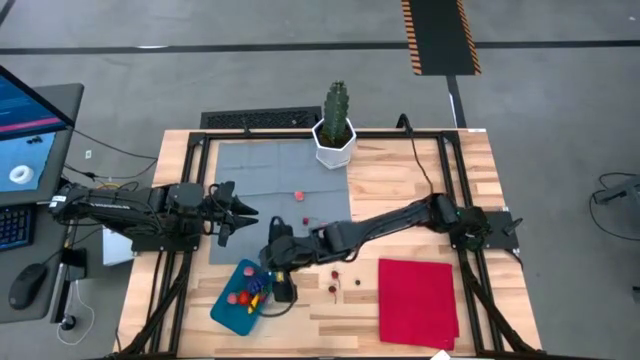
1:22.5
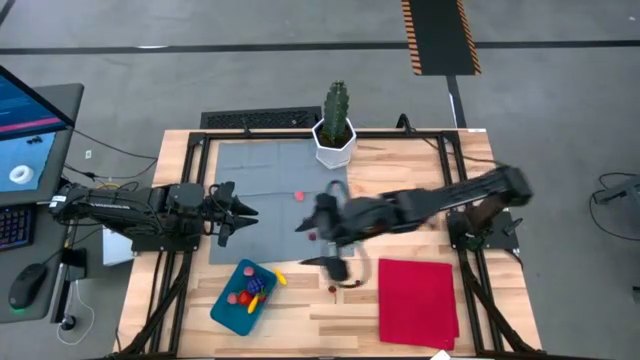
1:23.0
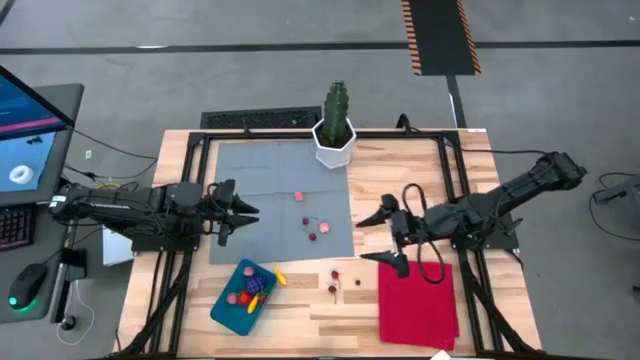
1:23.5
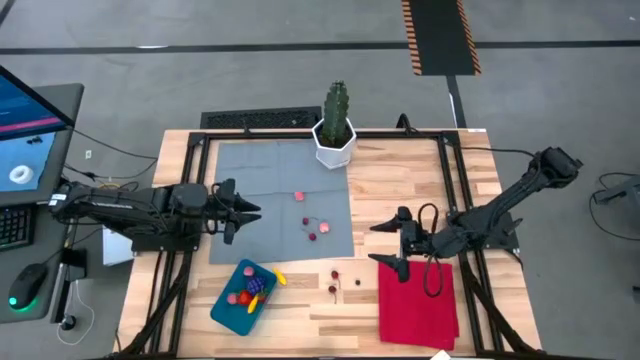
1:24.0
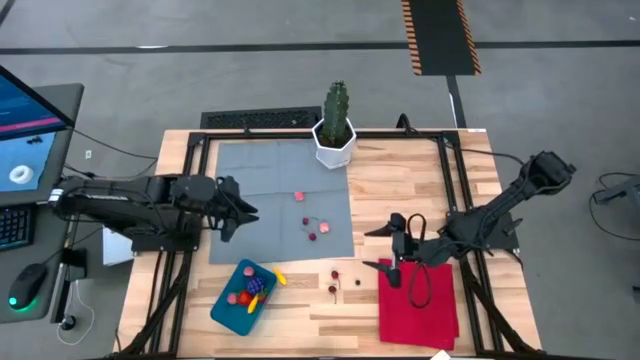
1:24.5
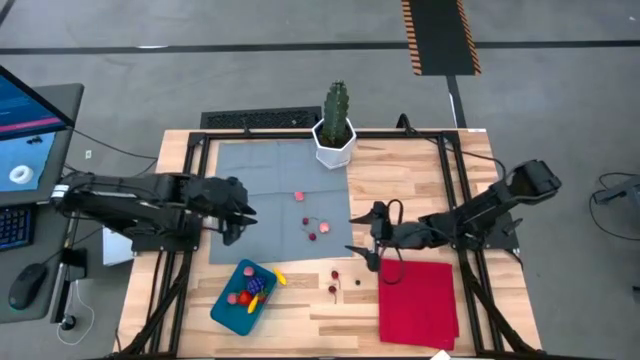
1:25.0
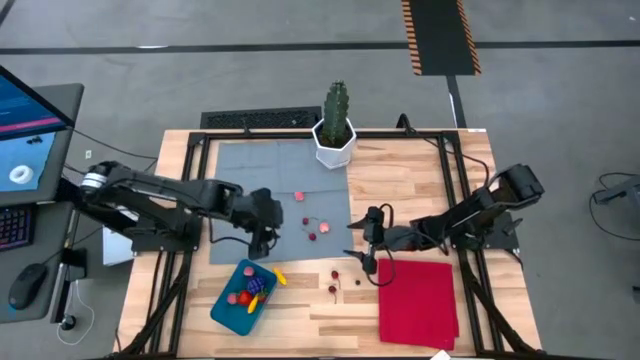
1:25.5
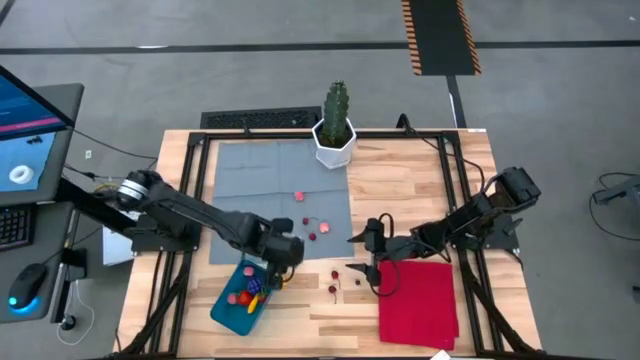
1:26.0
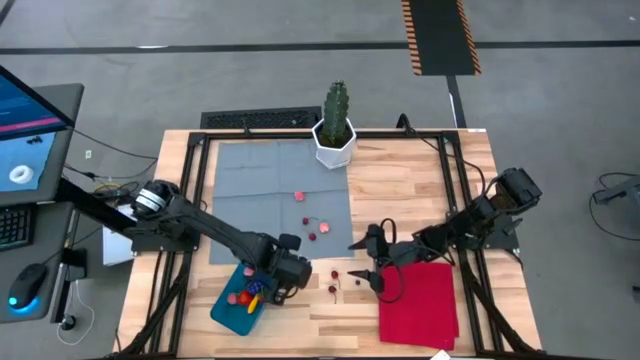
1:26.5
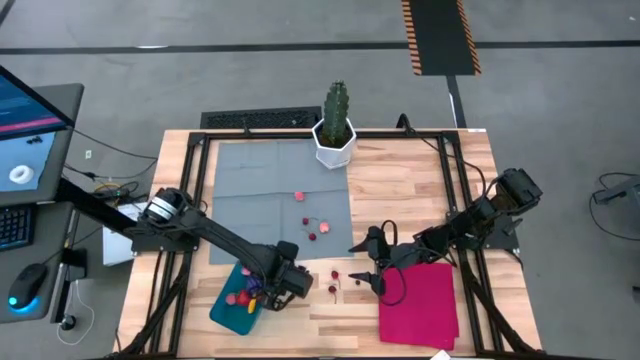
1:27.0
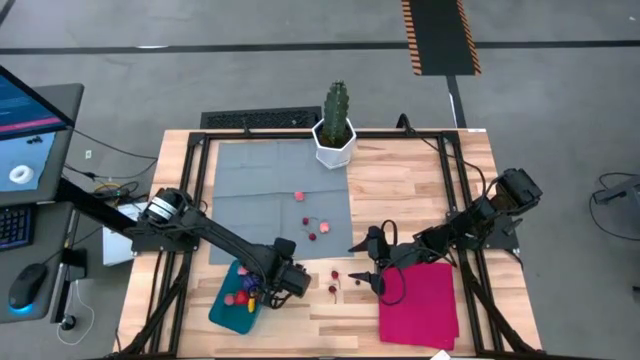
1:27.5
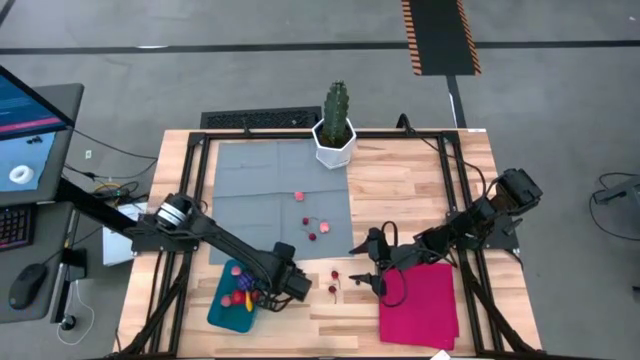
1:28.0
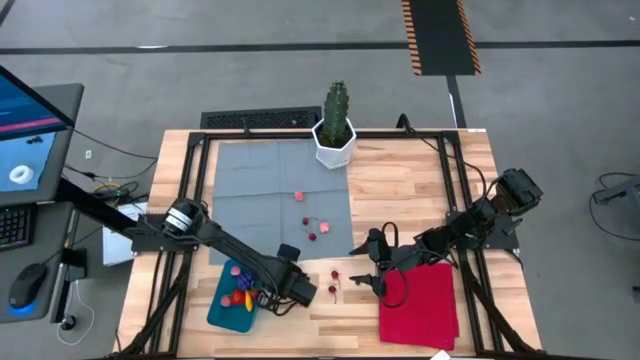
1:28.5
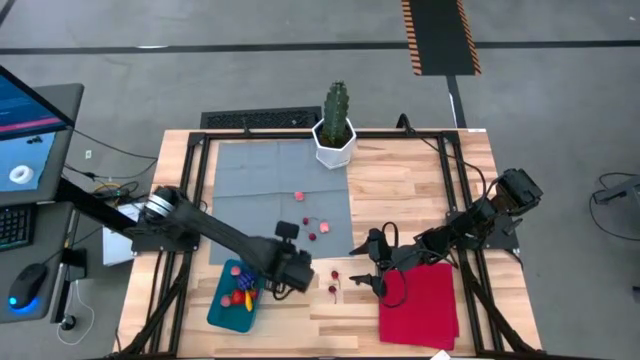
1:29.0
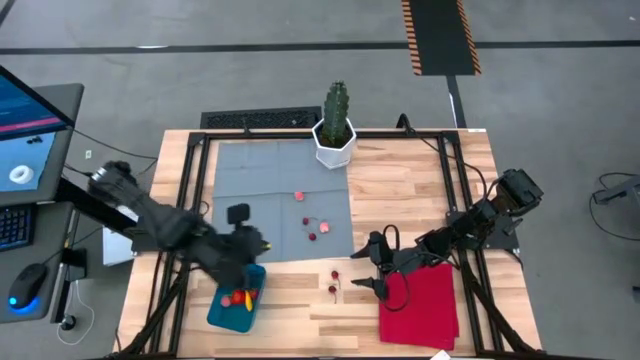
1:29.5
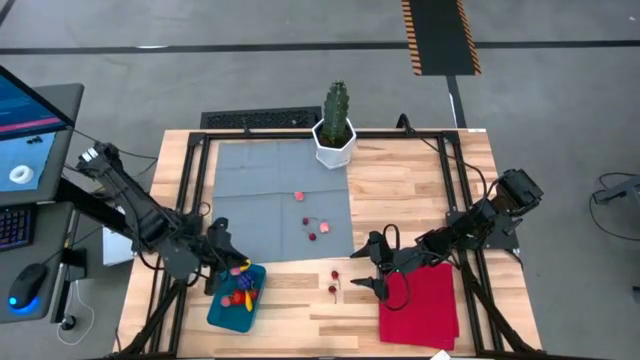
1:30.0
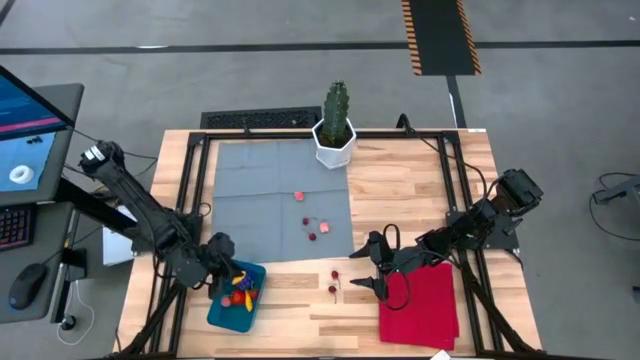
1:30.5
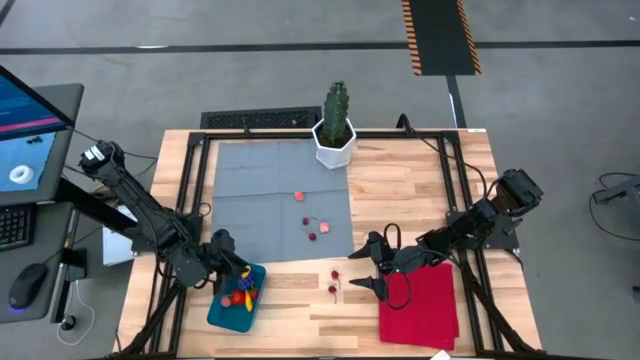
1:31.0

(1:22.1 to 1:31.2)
Task: Pick and placing Produce into tupperware
Put the corn into the blue bin

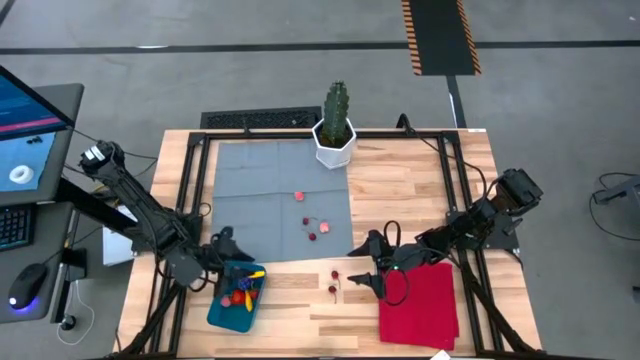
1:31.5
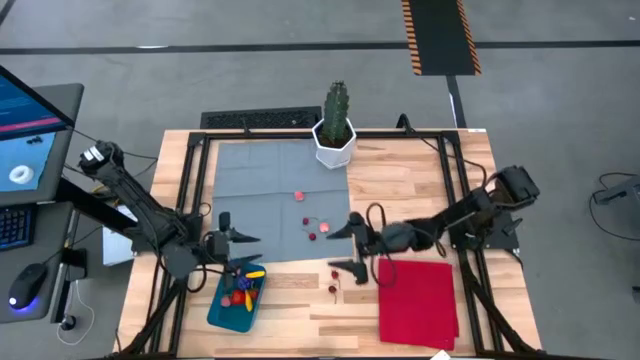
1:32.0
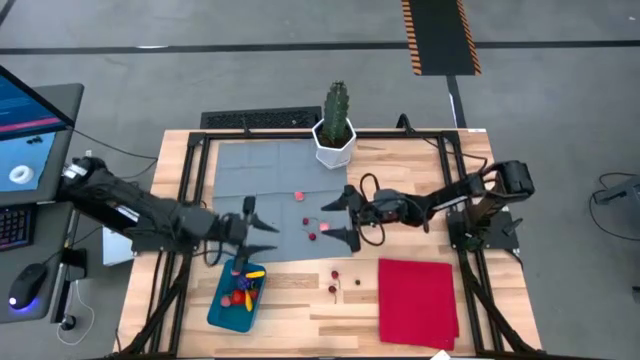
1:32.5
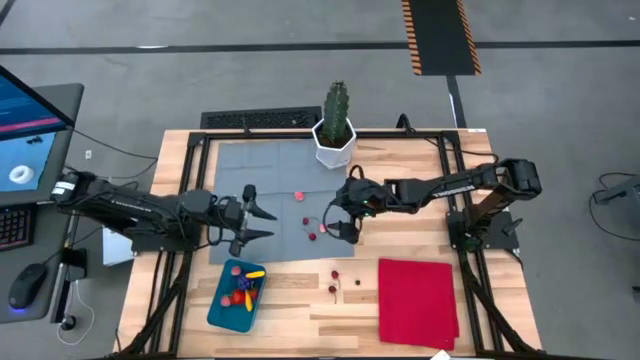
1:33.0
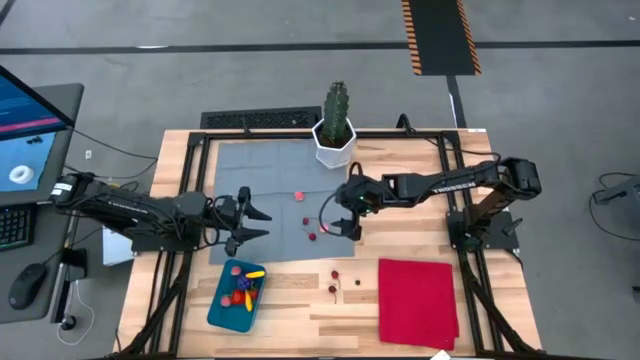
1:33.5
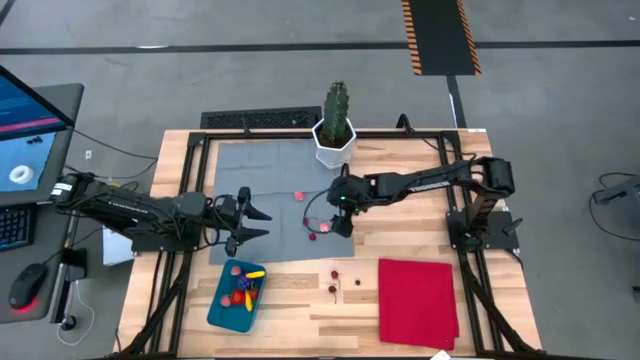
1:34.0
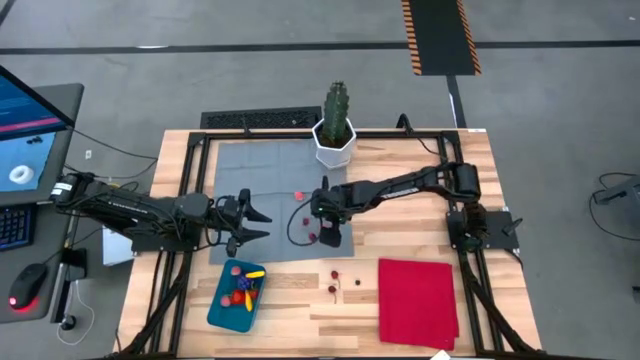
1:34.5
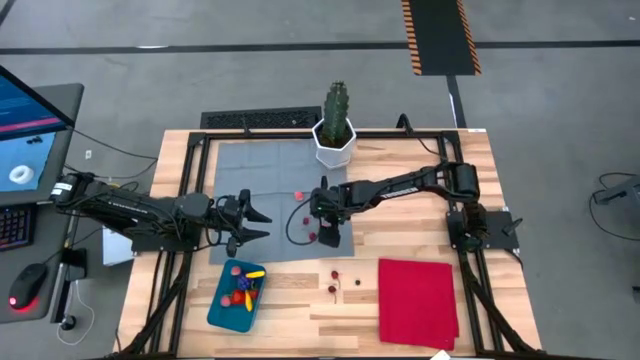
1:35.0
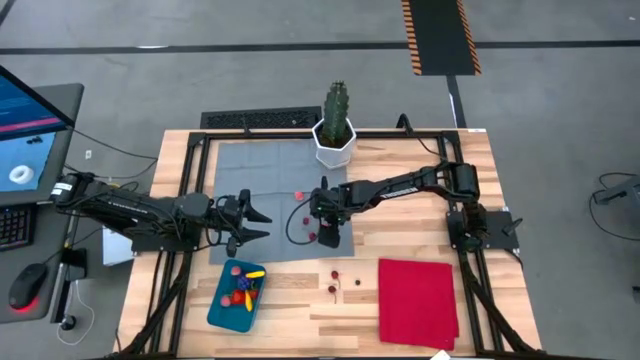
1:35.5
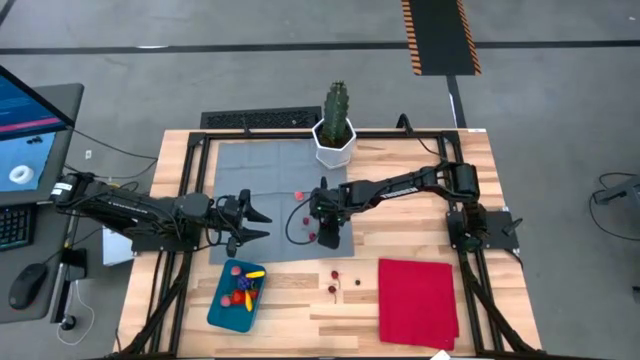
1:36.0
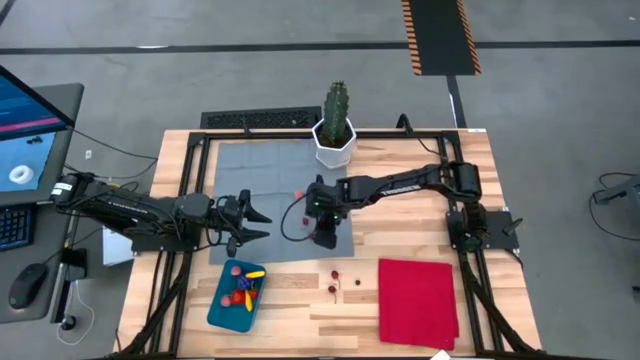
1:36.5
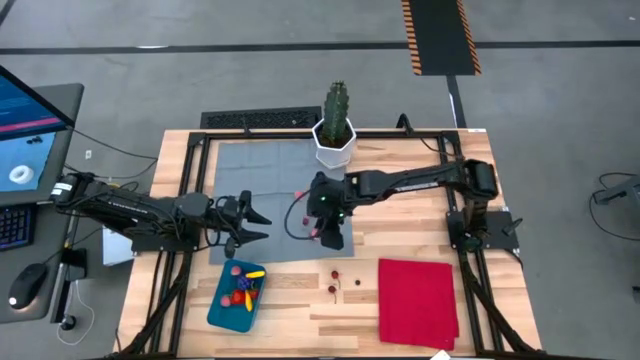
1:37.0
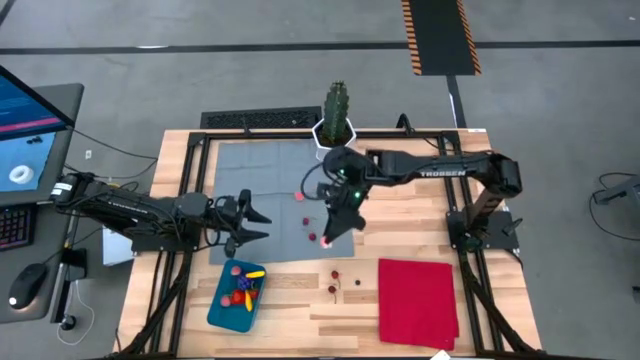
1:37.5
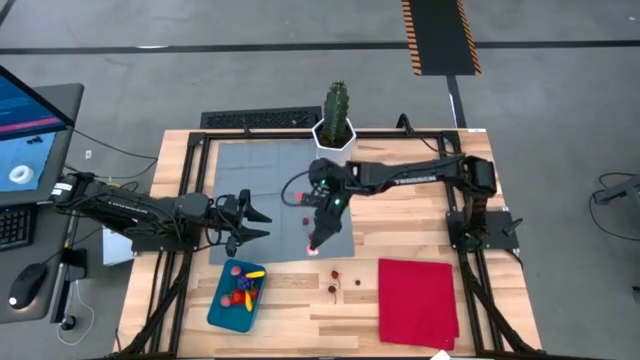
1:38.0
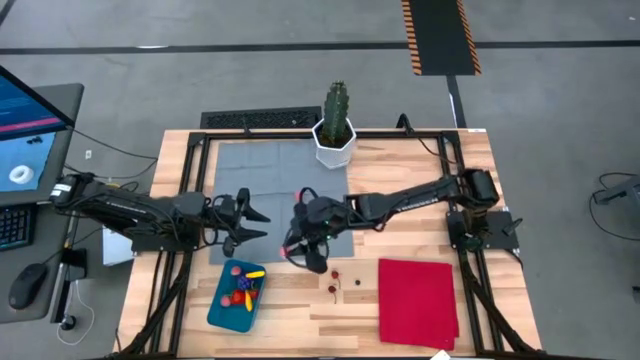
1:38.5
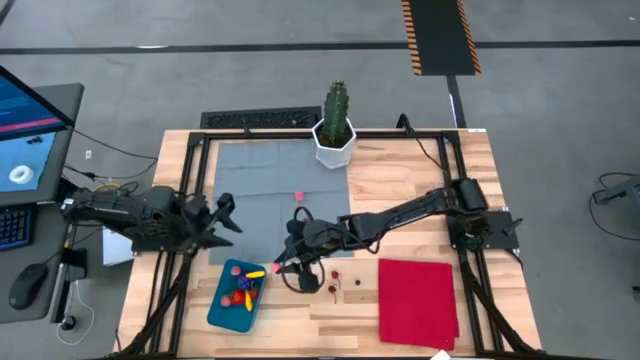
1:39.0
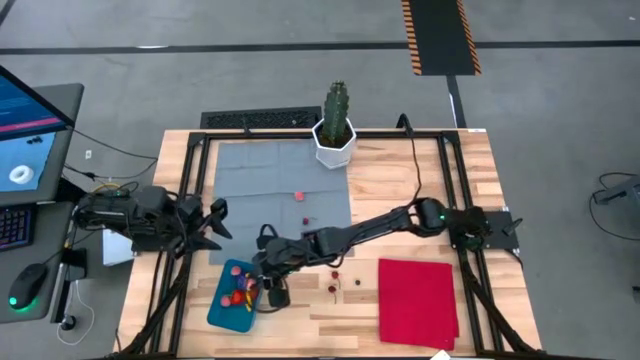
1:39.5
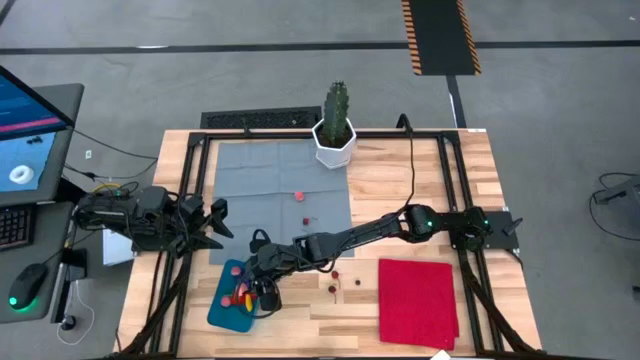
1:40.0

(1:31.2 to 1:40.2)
Put the peach into the blue bin

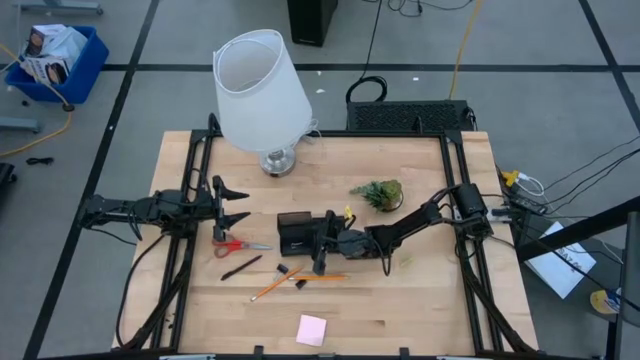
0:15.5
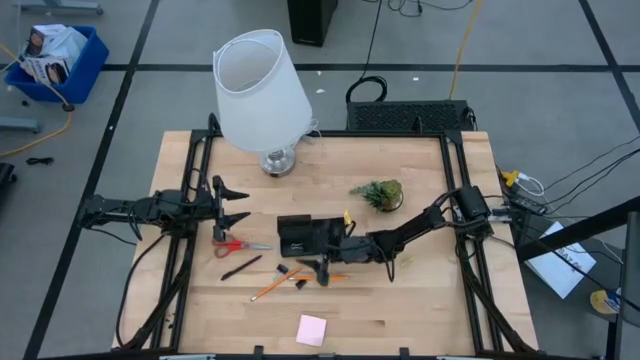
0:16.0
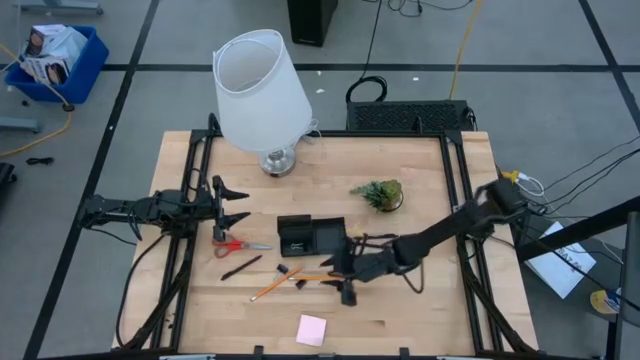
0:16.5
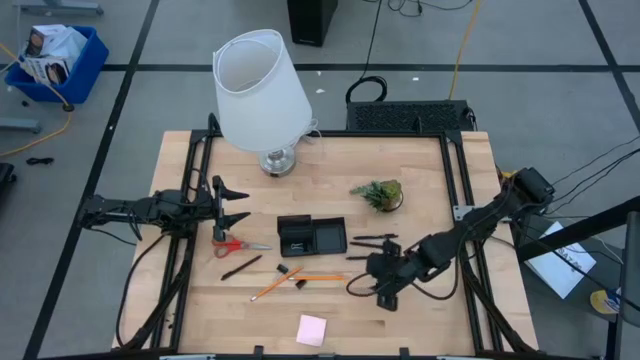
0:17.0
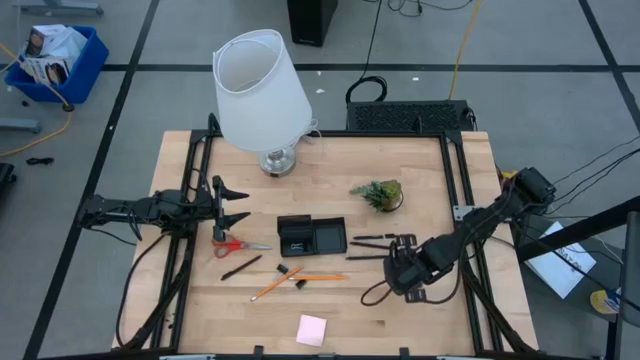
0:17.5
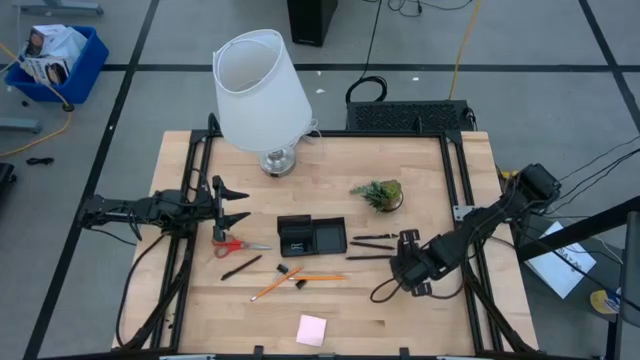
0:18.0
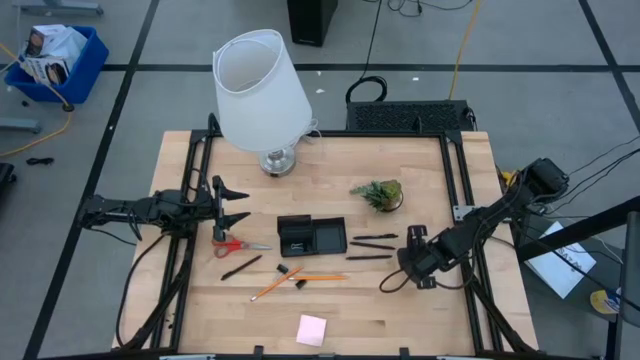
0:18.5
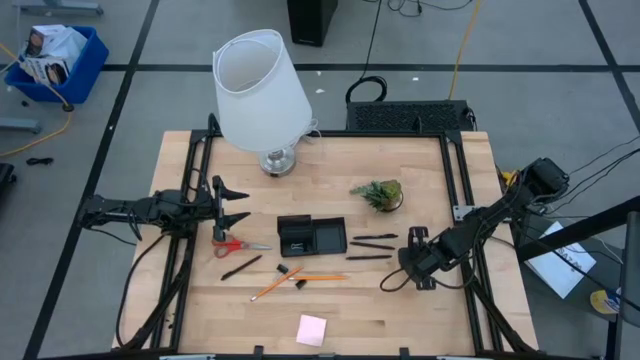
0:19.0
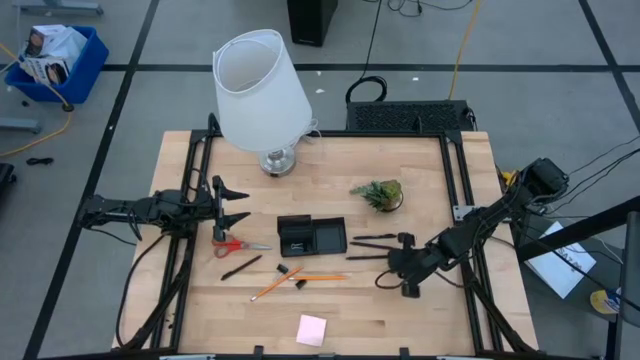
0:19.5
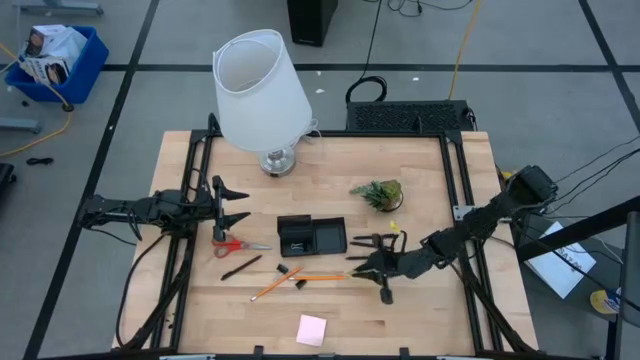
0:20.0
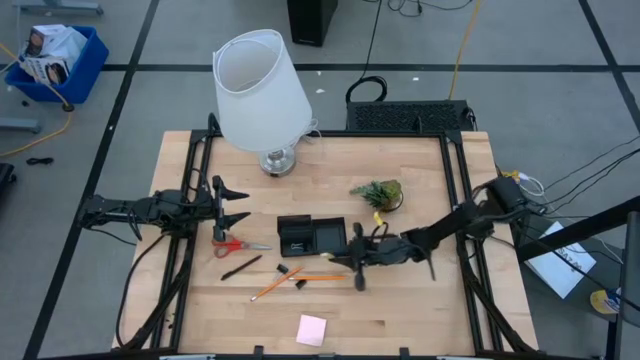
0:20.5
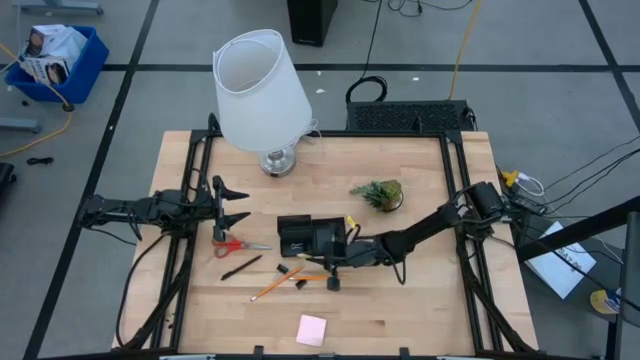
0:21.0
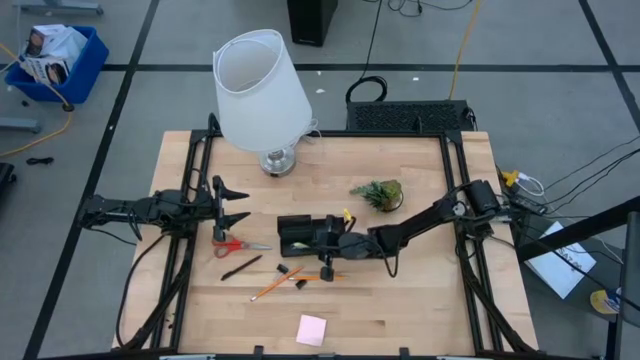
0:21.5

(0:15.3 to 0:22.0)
Task: Pick and place office supplies into organizer
Put the green eraser into the black desk organizer
